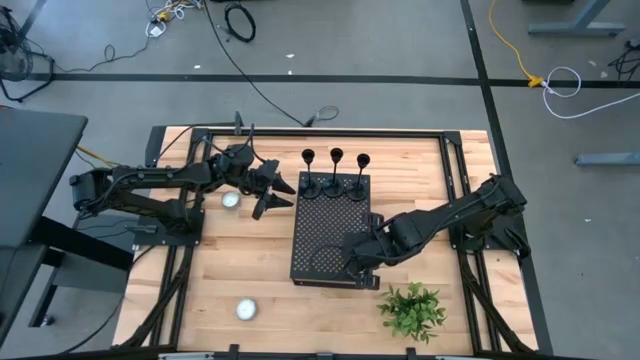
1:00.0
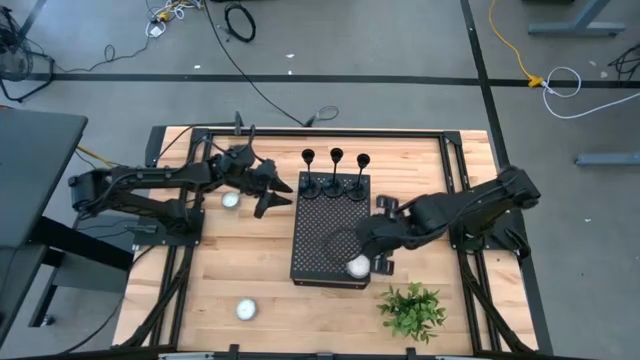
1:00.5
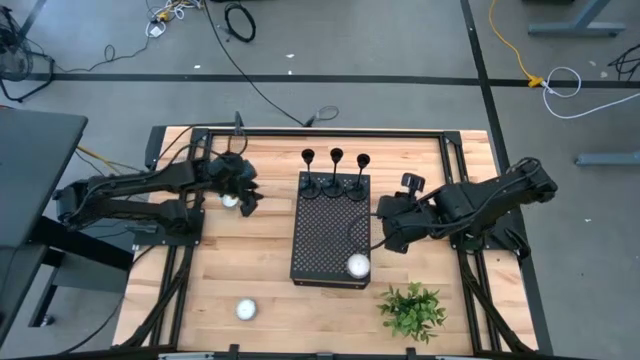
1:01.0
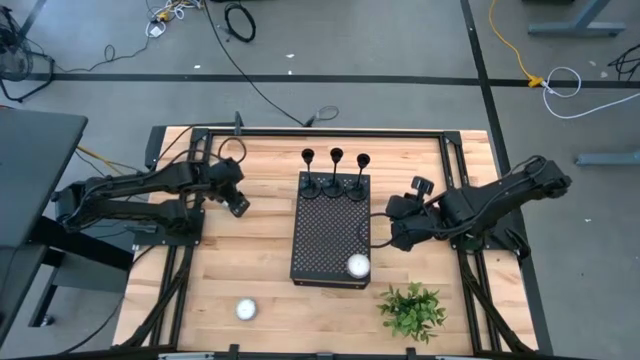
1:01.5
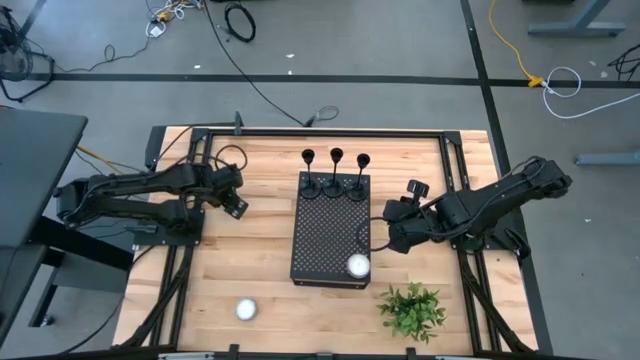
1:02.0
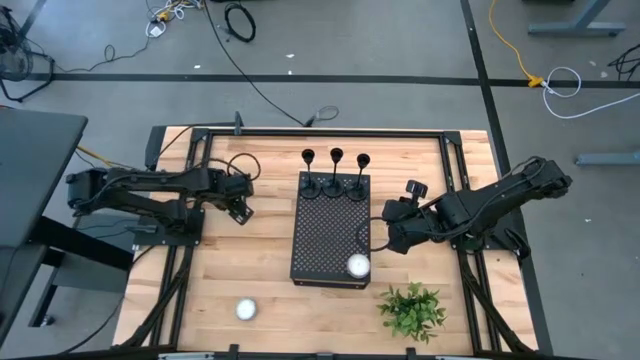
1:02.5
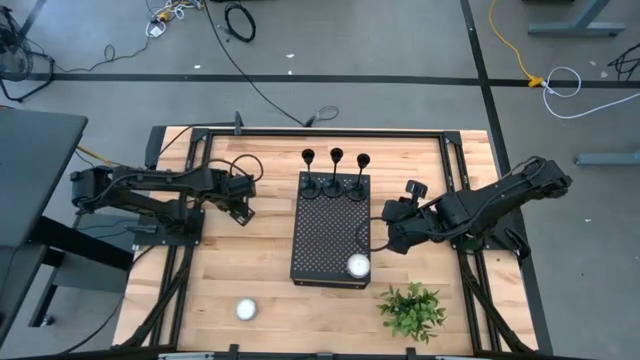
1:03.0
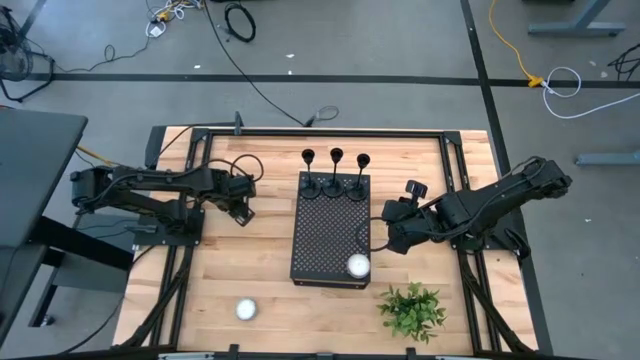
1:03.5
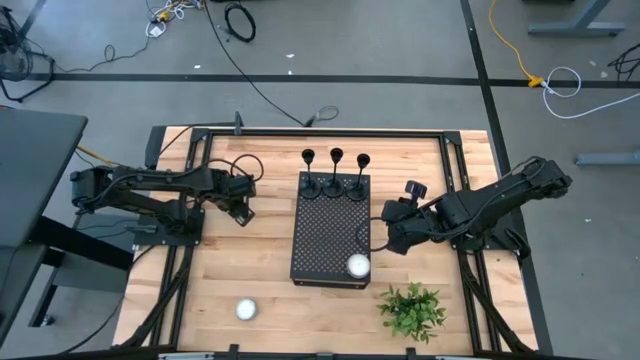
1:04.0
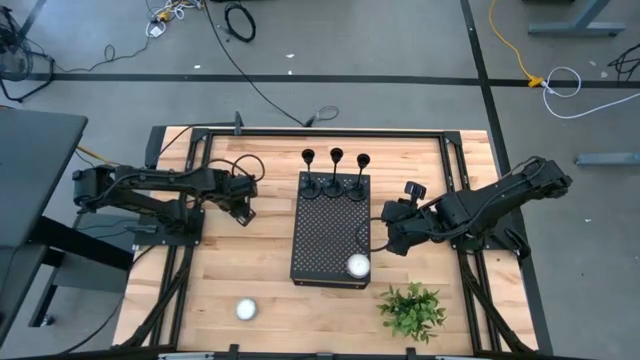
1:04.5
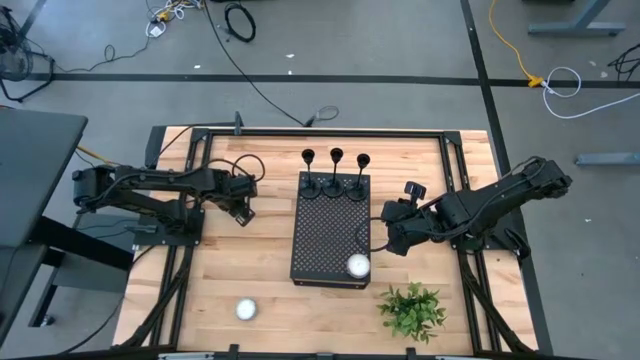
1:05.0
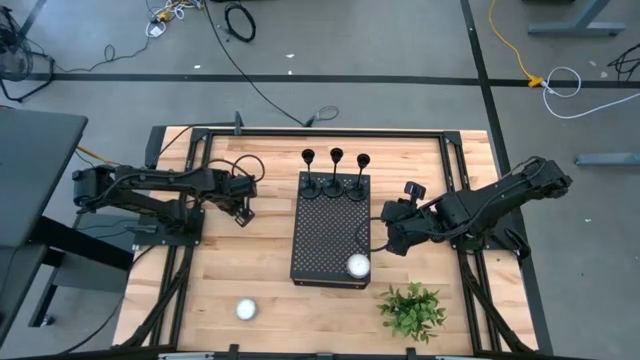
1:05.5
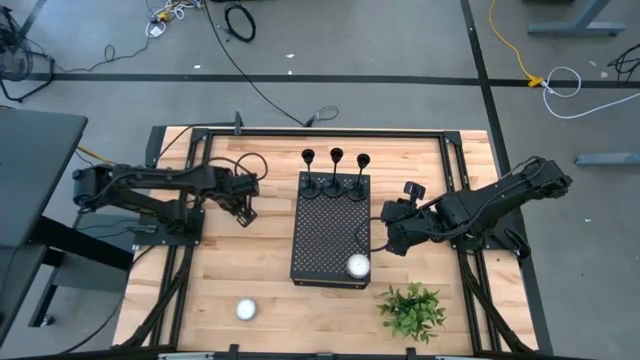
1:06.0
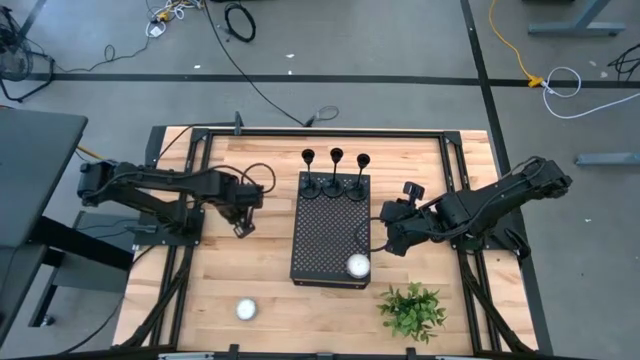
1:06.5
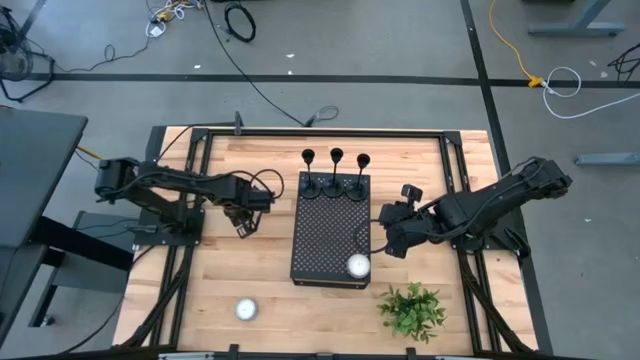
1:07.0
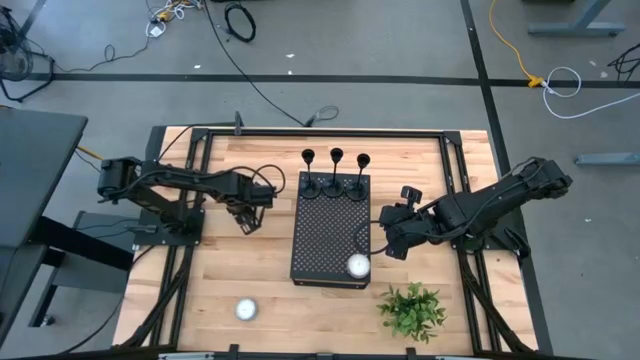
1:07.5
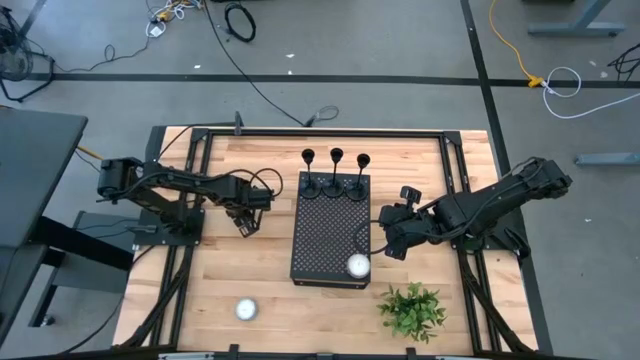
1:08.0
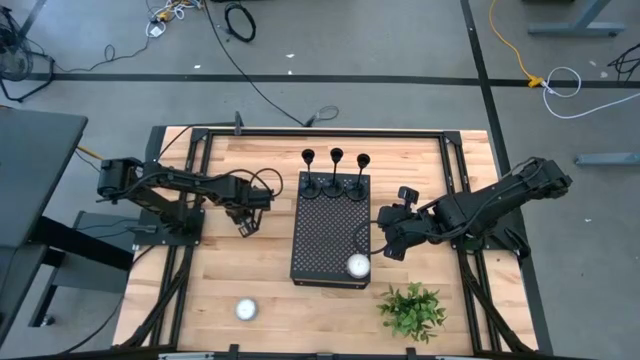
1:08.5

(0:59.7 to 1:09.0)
Task: Pick & Place candle stick holders
Put the blue scented candle on the shelf

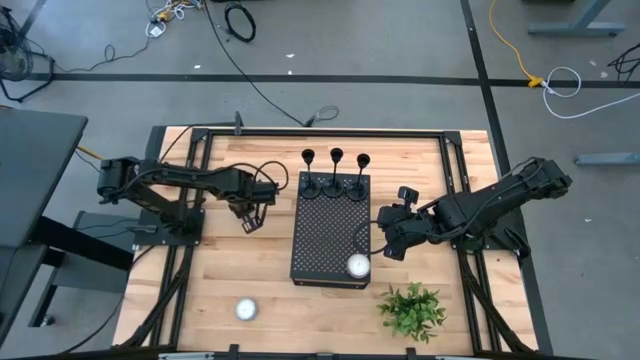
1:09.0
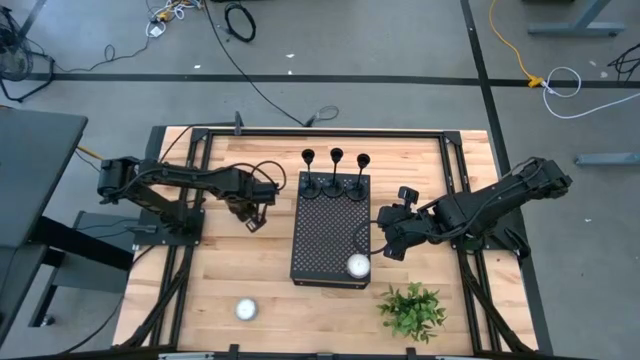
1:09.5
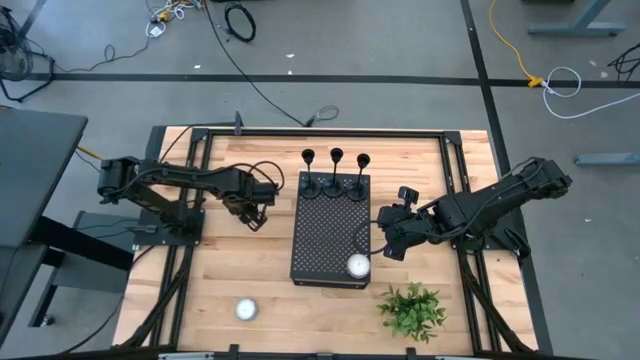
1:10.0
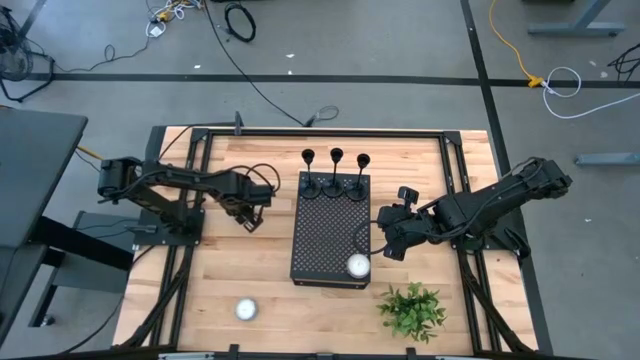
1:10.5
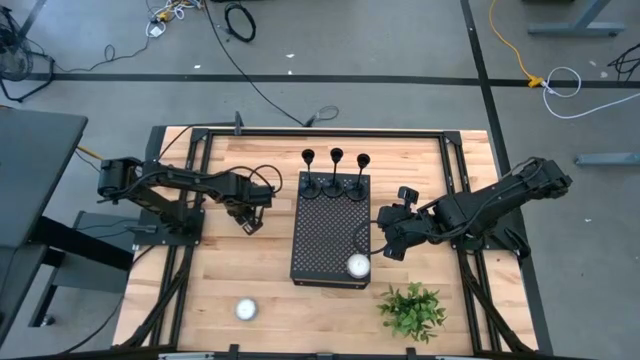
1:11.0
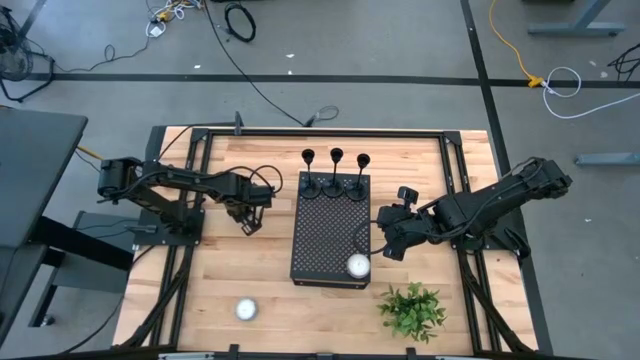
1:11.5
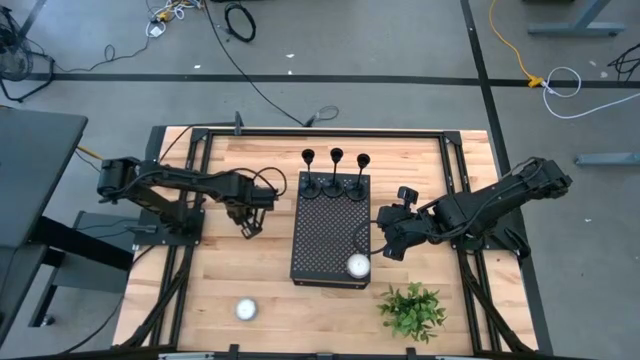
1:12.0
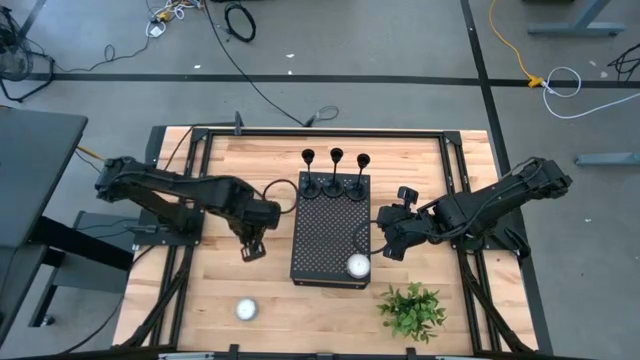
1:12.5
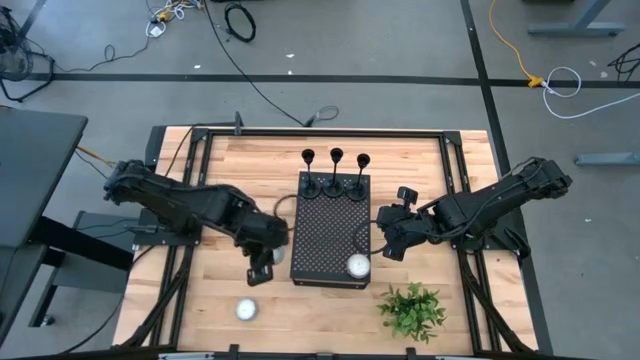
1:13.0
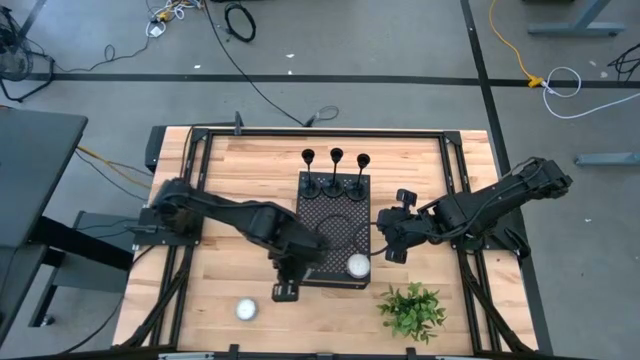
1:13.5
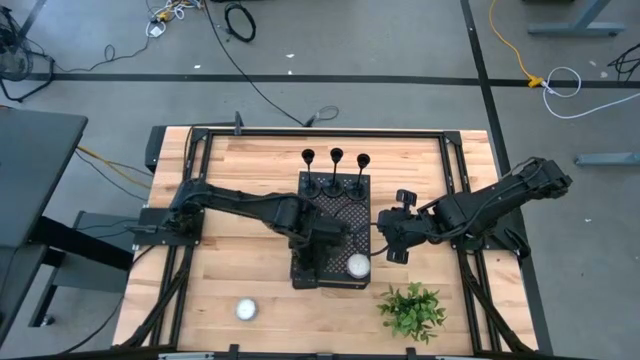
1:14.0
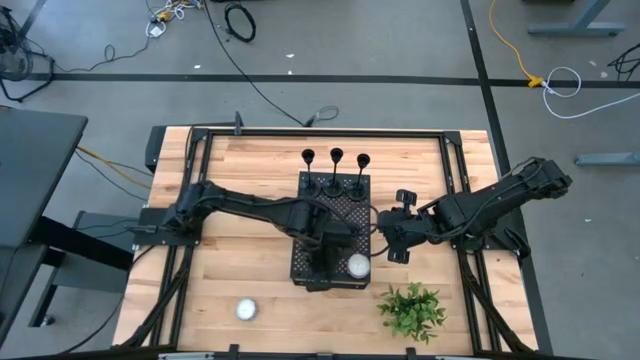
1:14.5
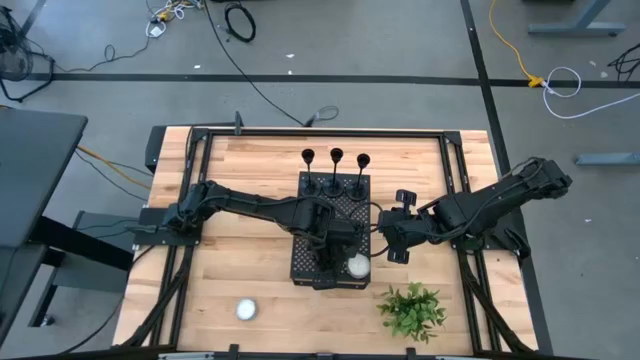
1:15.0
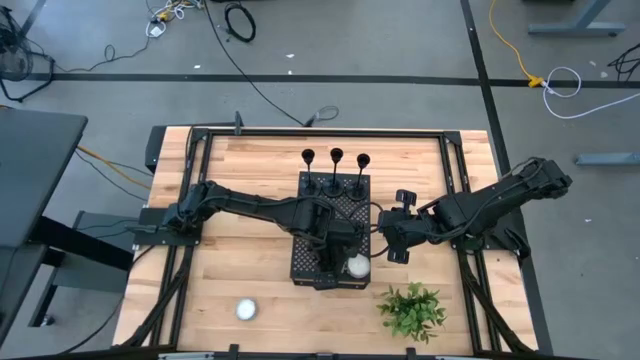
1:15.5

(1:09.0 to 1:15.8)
Put the blue scented candle on the shelf

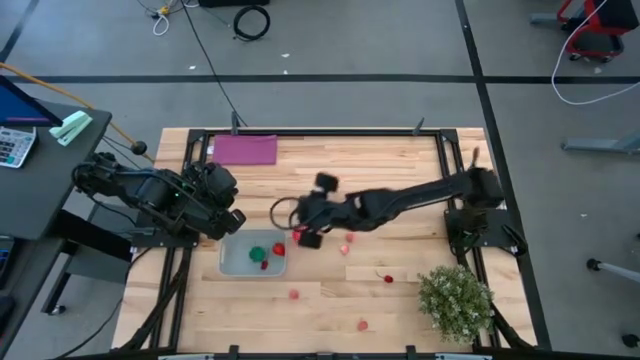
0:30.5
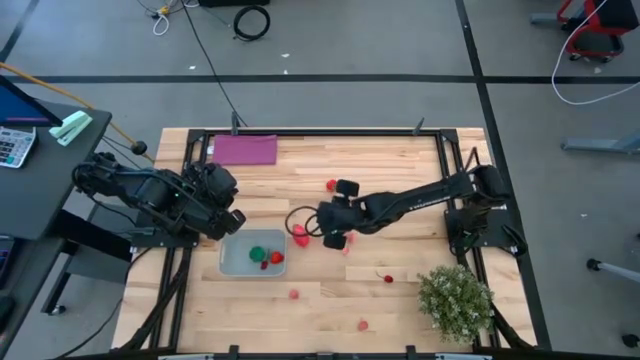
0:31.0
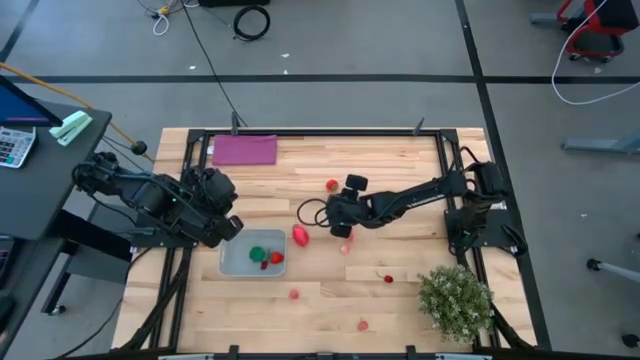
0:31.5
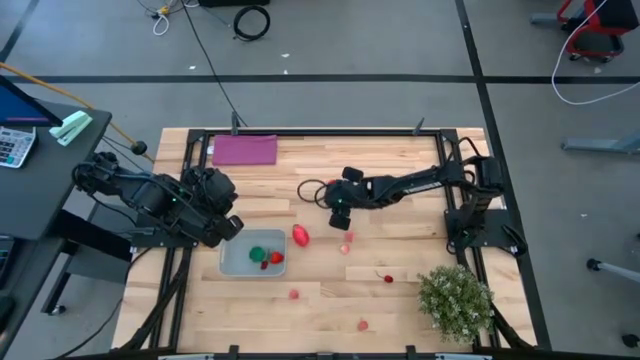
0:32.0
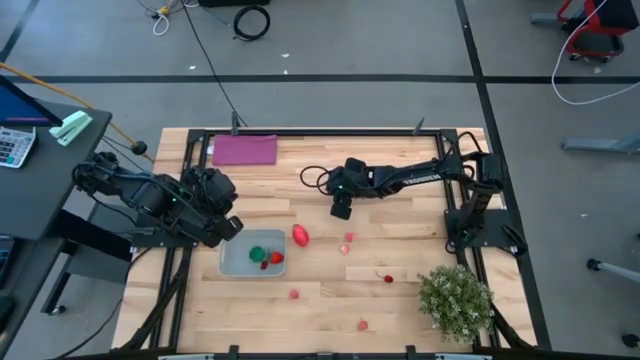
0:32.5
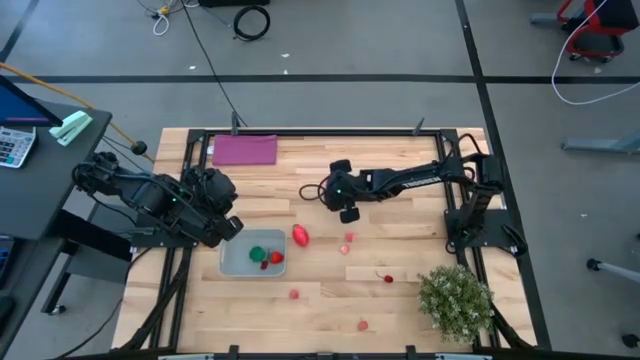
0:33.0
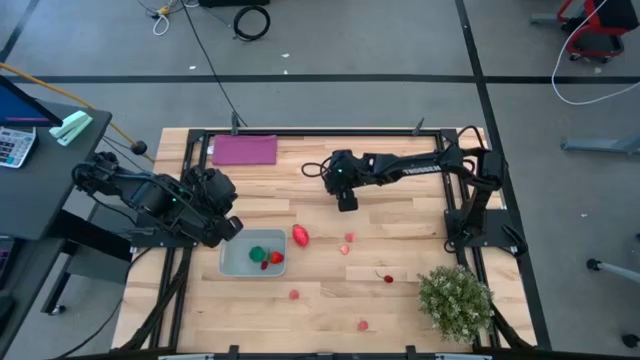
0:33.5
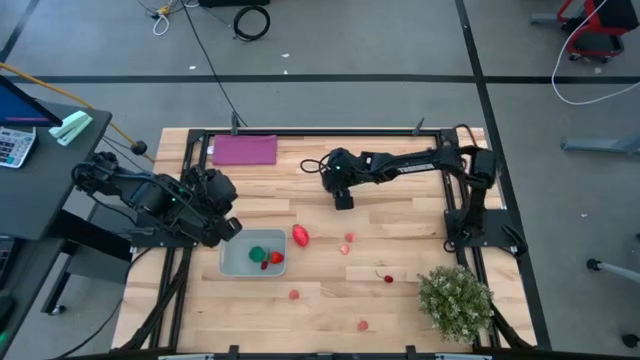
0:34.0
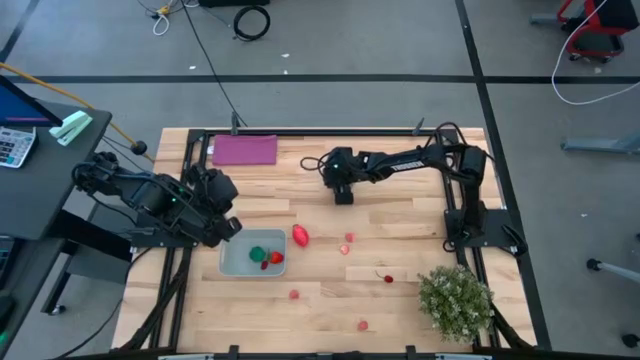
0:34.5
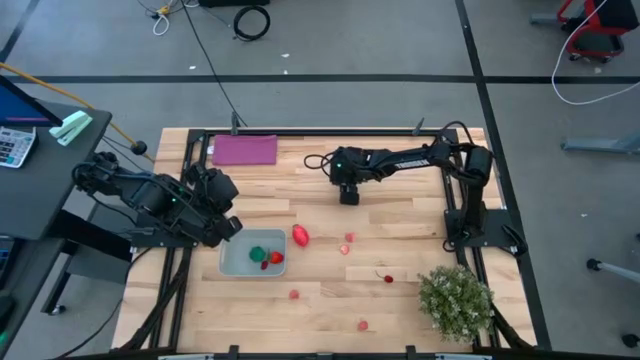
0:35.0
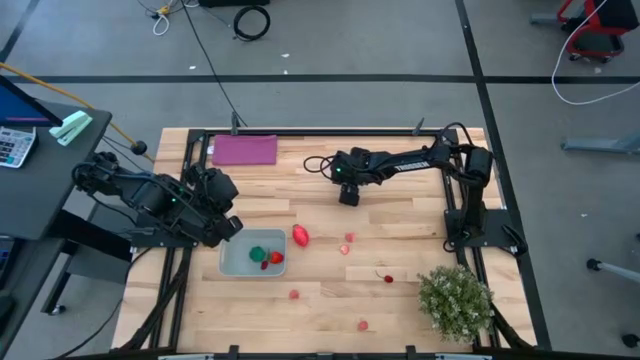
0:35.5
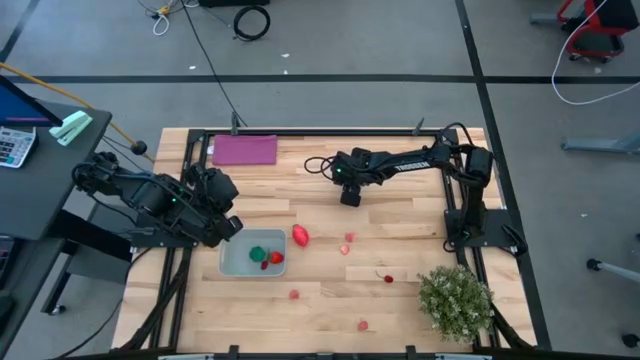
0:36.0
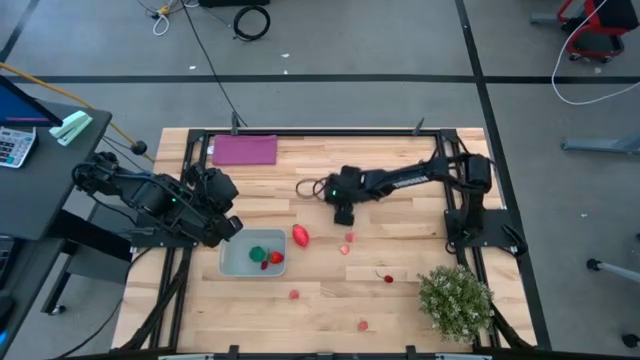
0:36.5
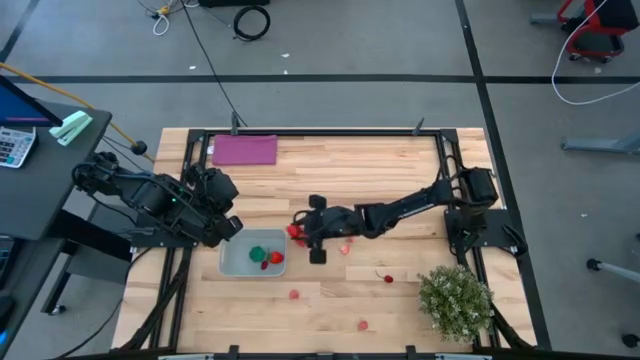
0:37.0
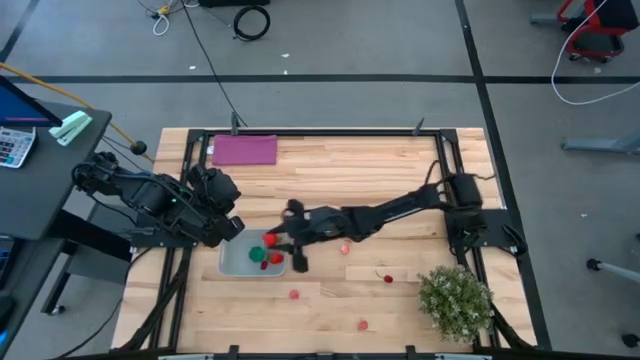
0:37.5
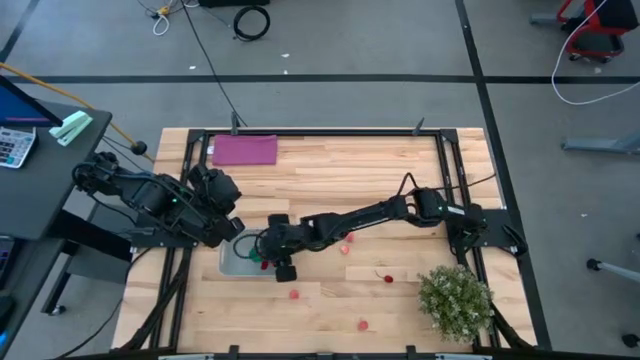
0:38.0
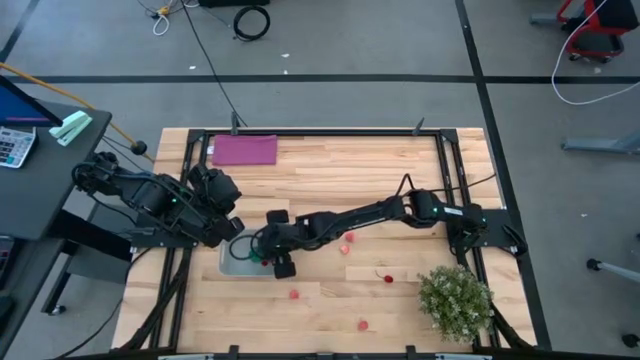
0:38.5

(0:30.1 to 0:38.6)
Task: Pick and placing Produce into tupperware
Put the red strawberry into the gray container
